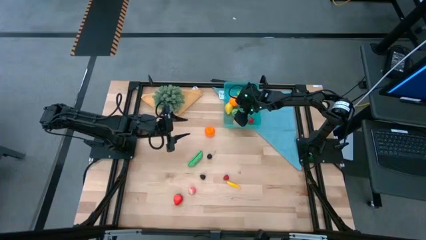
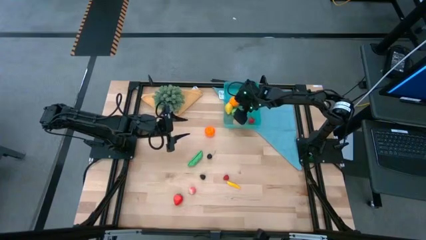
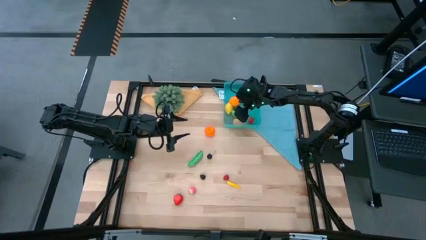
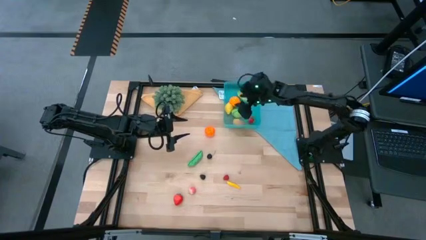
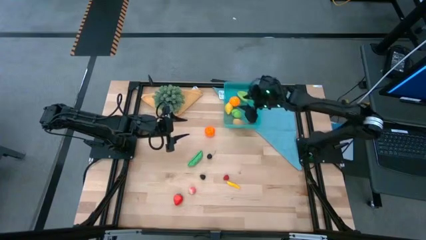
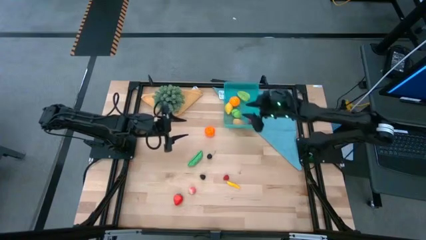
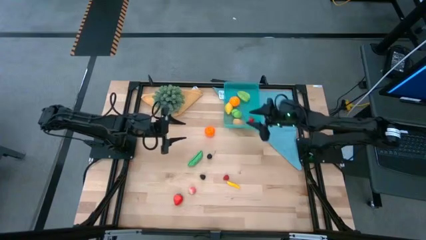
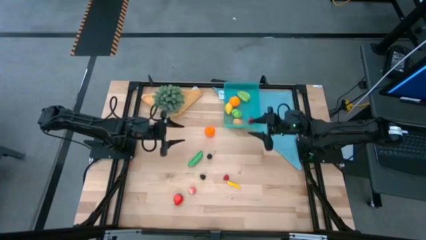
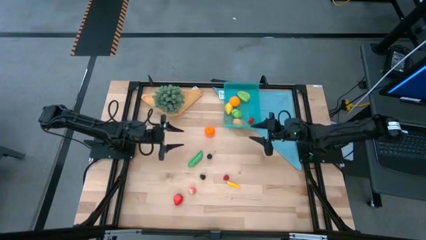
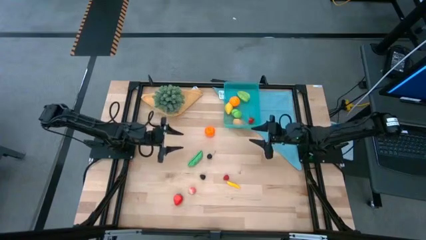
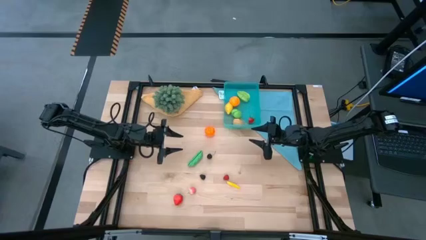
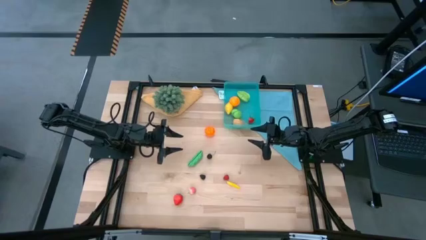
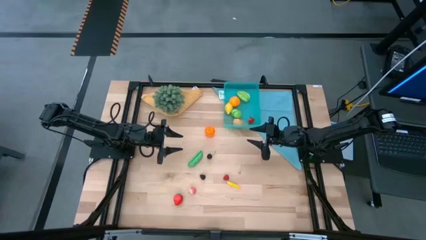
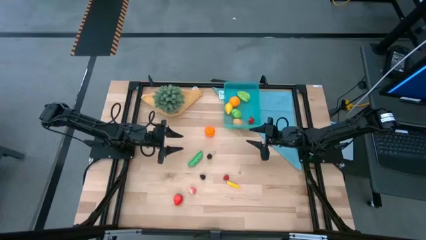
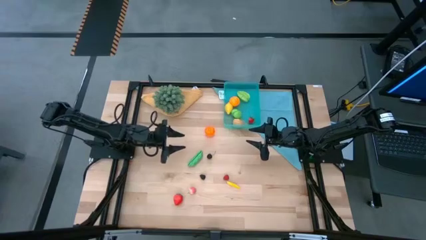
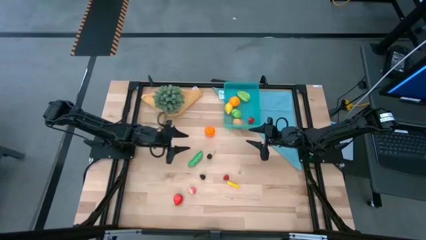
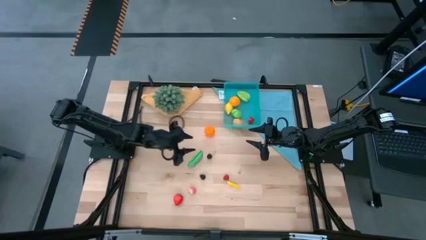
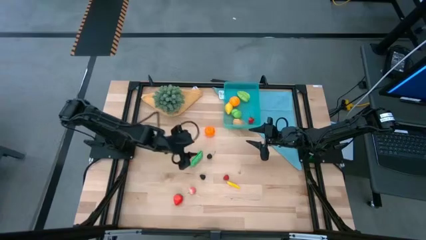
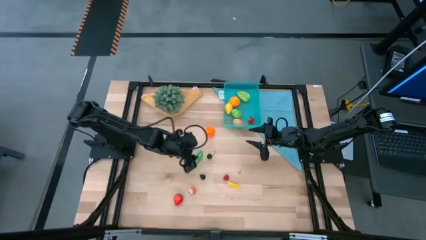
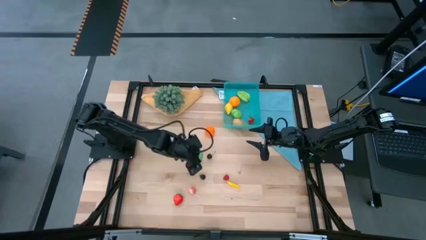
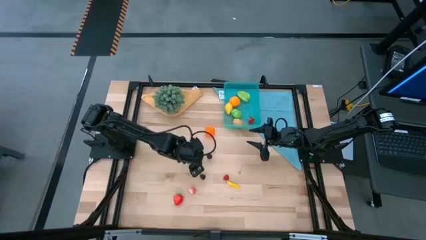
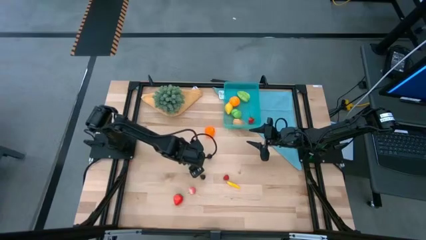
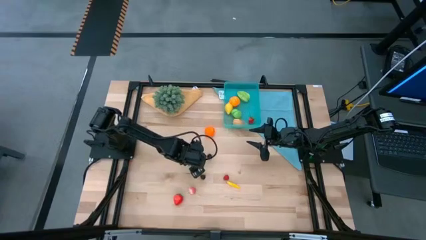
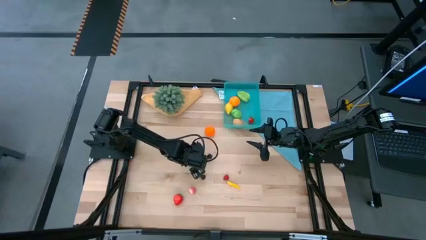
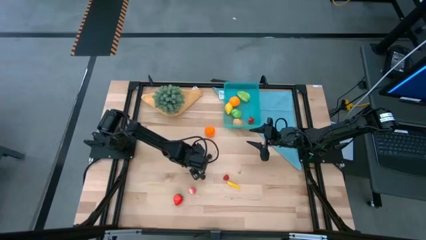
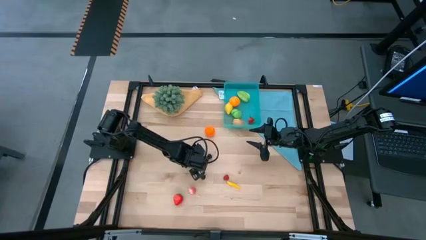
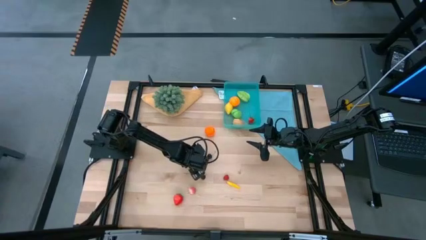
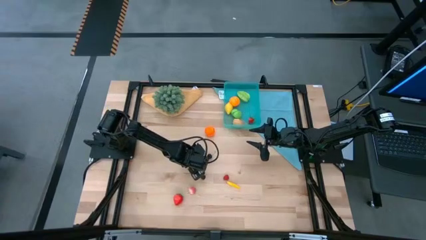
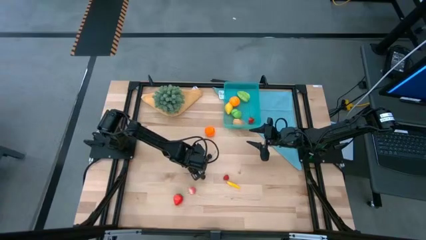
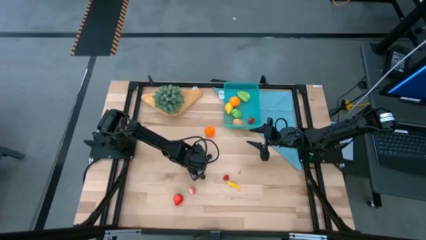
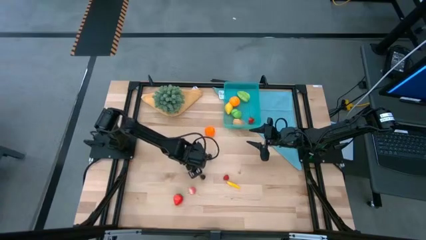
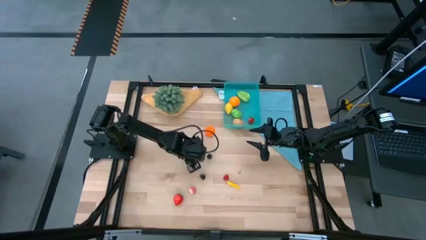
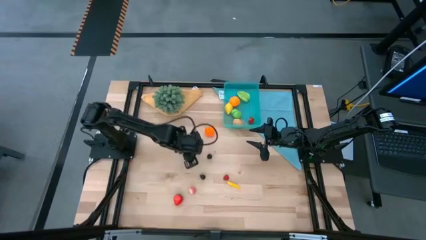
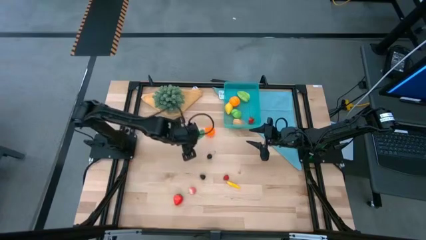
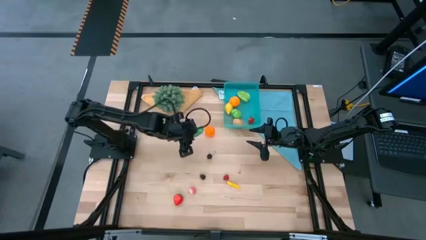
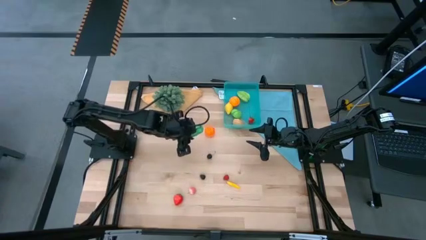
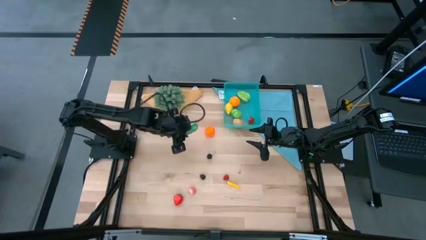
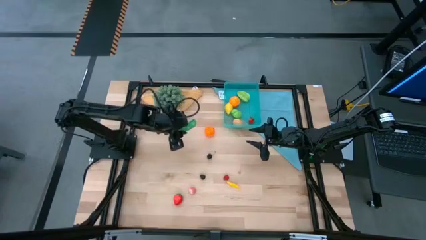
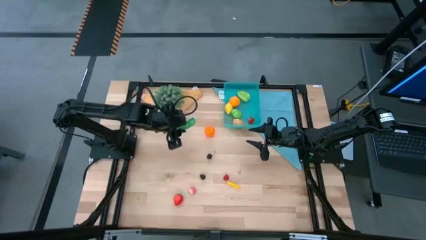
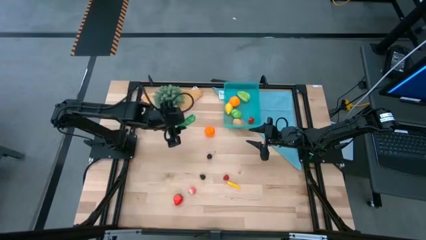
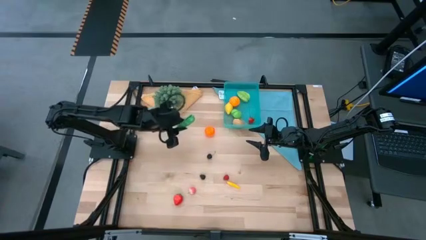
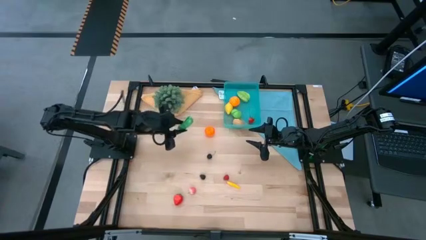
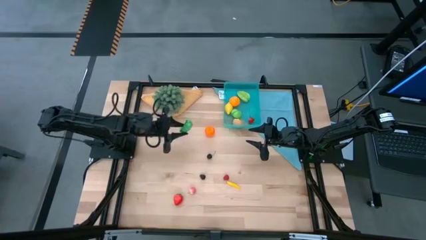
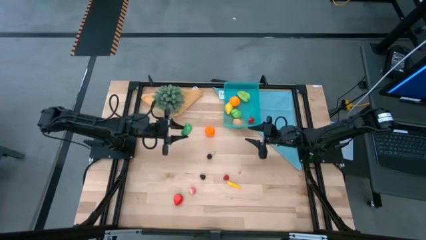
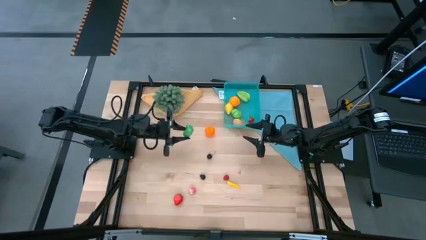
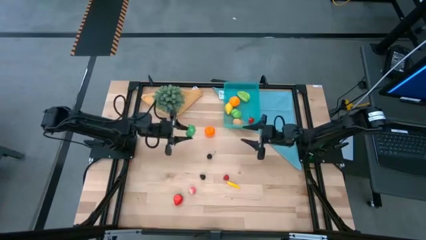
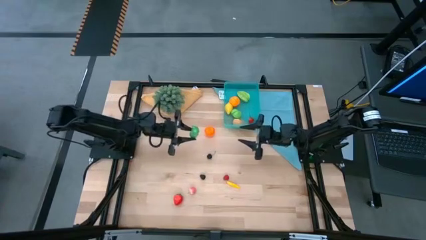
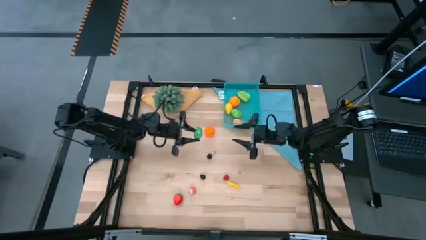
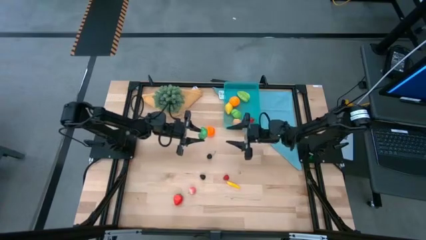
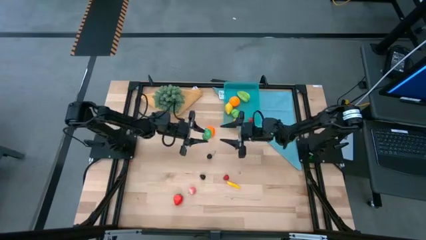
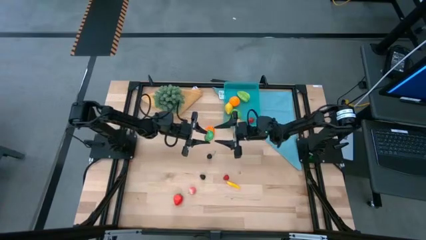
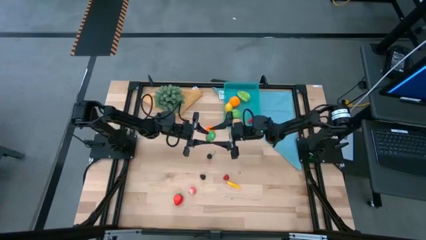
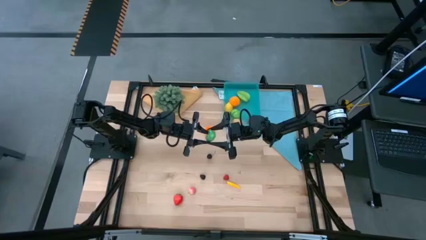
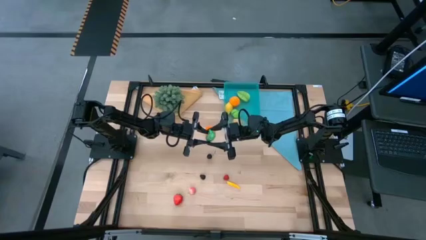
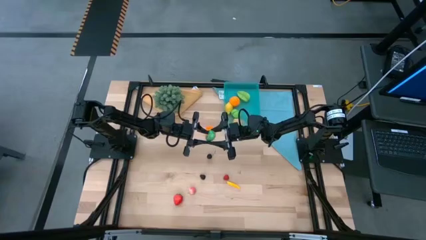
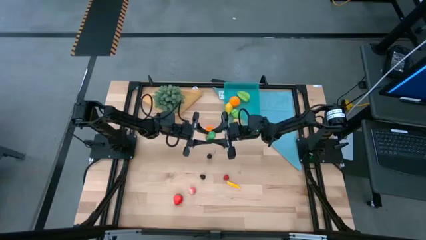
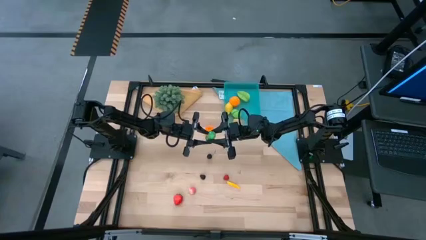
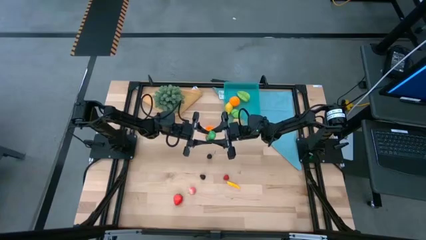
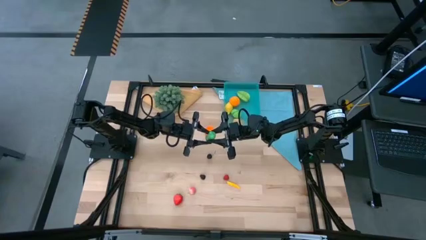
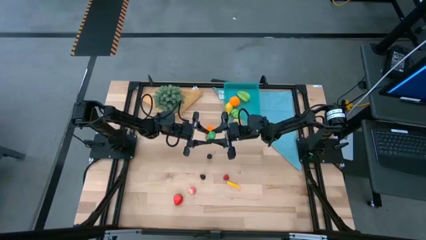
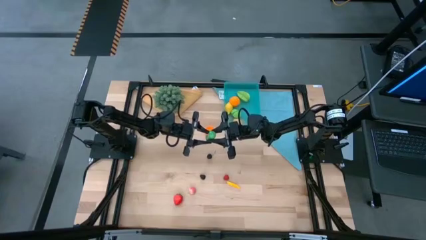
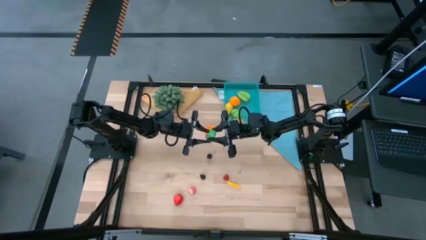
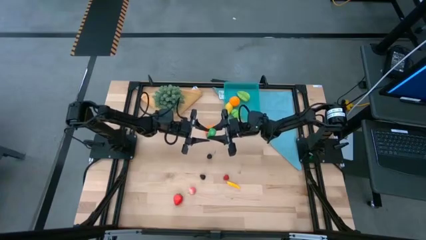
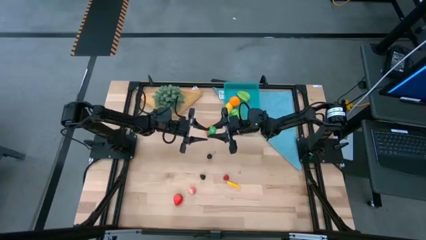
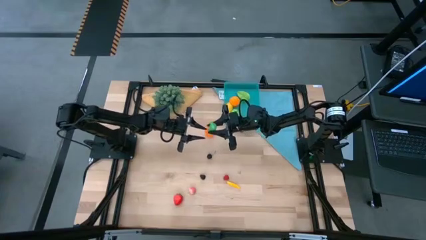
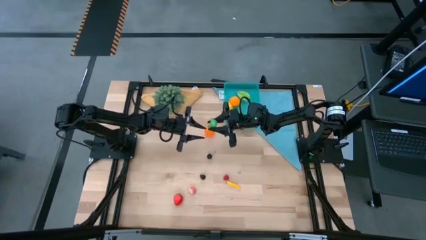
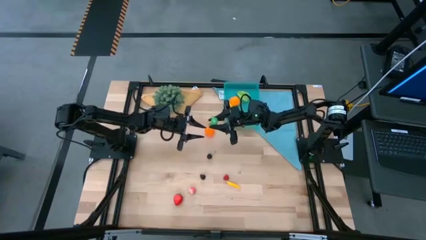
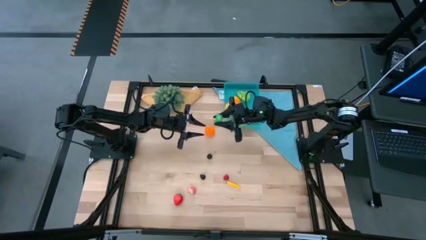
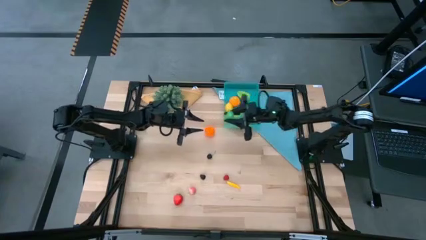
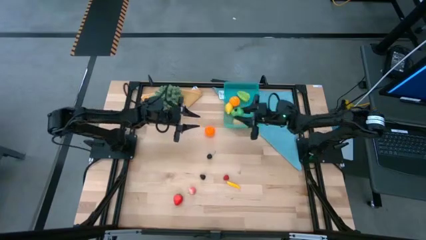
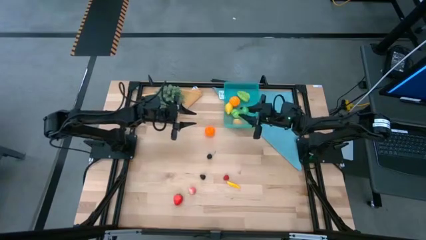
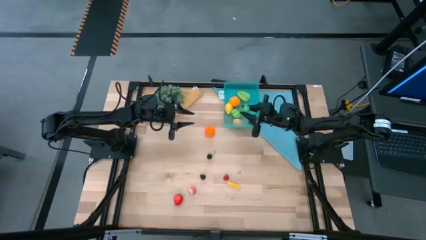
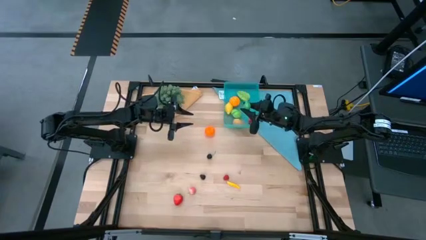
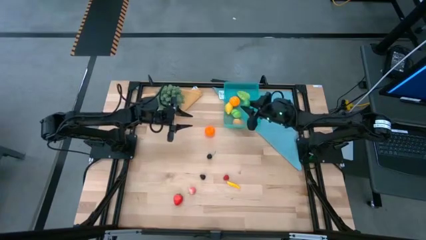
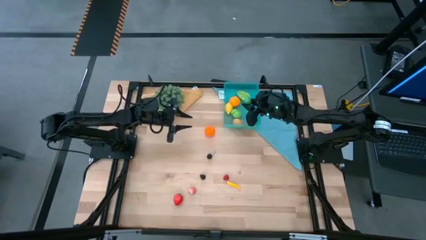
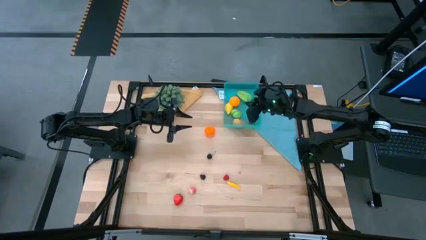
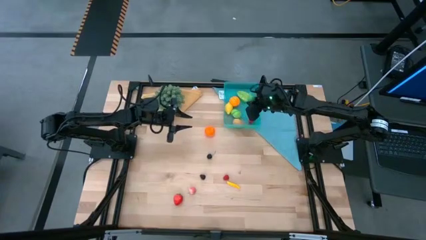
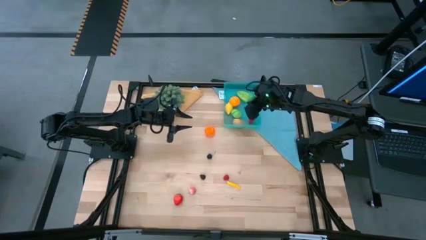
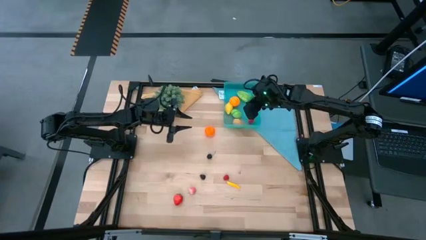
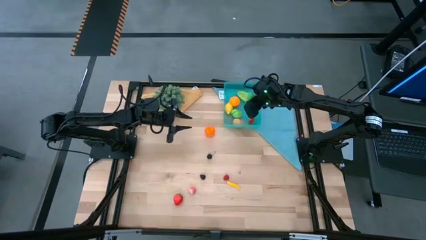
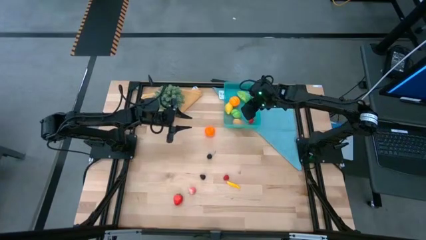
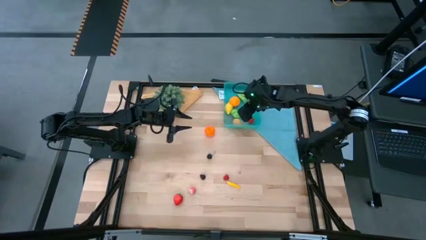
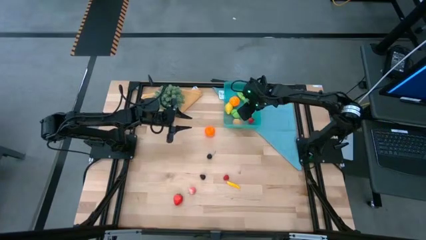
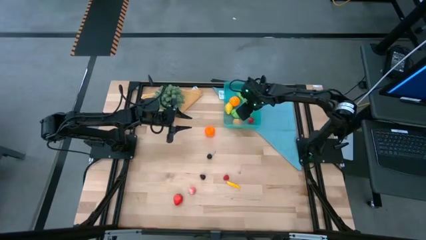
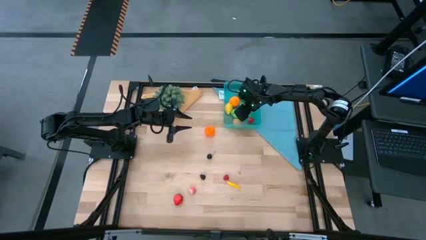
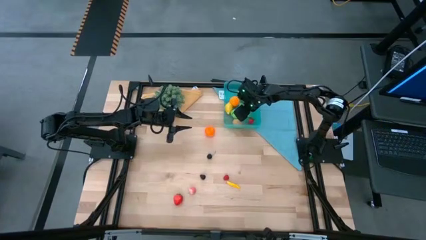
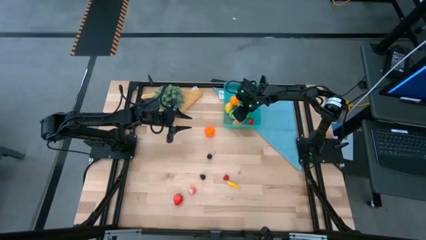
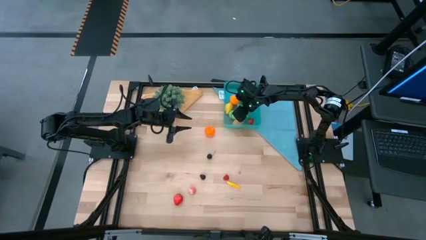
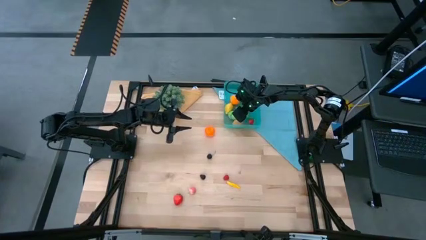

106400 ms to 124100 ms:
Task: Pick and placing Produce into tupperware
Put the green pea into the blue bin
